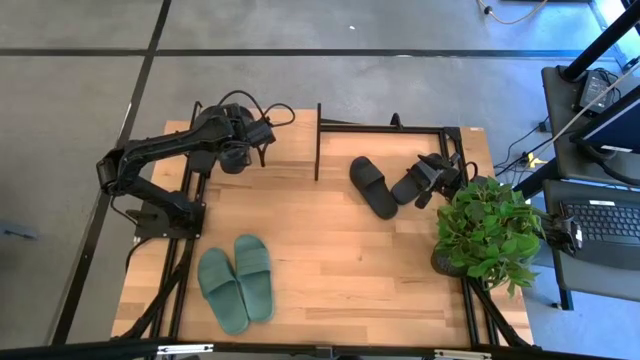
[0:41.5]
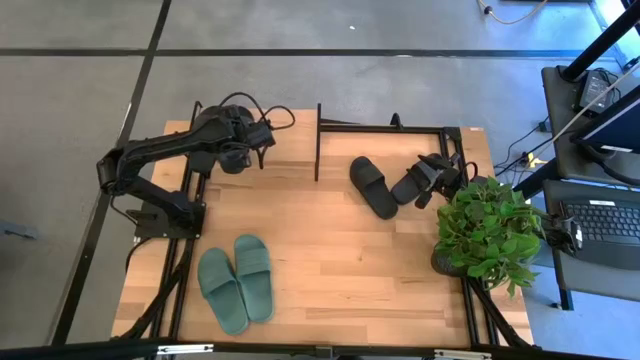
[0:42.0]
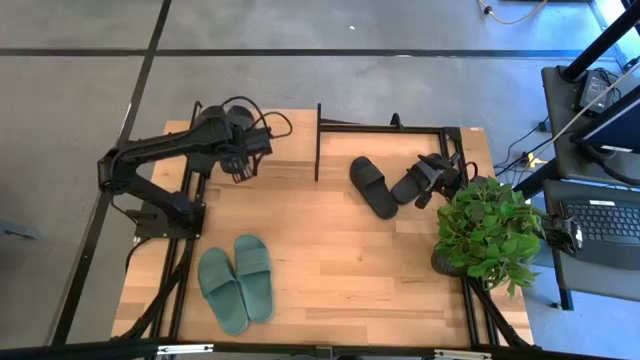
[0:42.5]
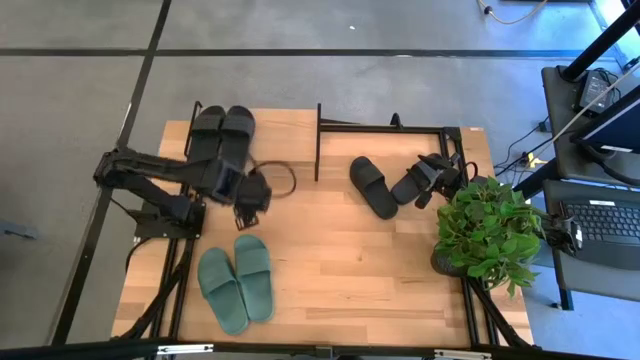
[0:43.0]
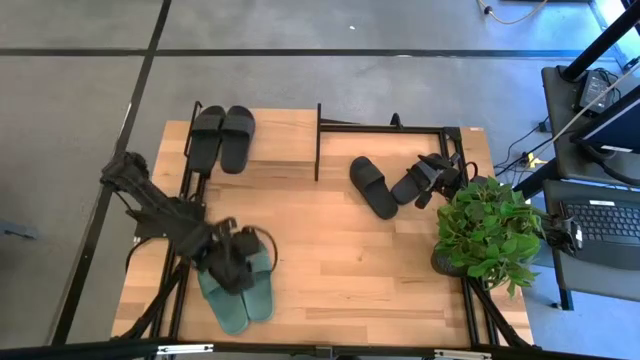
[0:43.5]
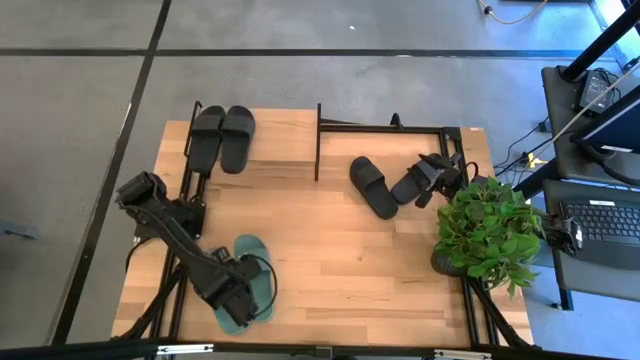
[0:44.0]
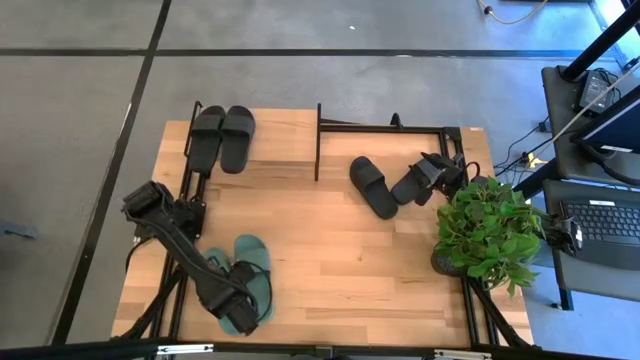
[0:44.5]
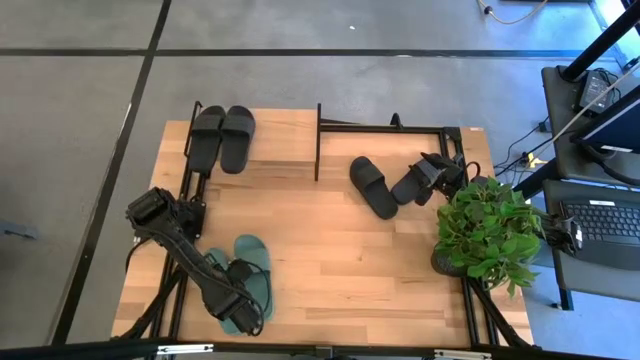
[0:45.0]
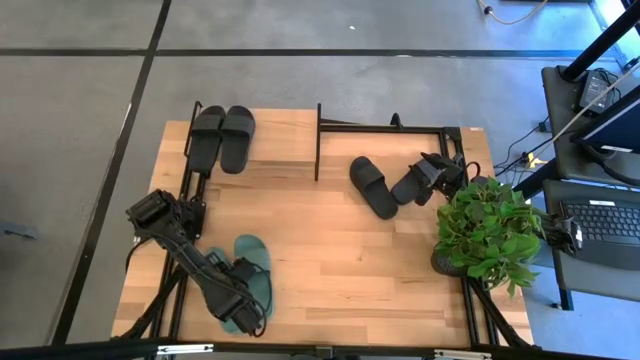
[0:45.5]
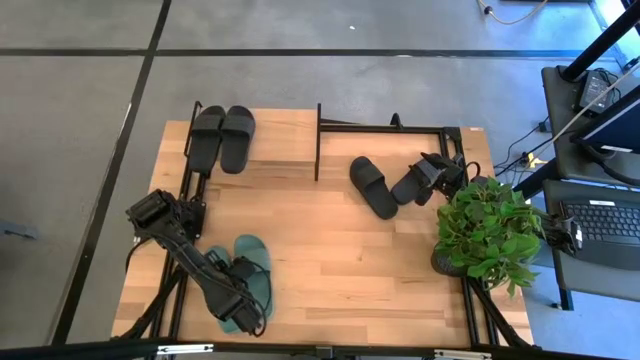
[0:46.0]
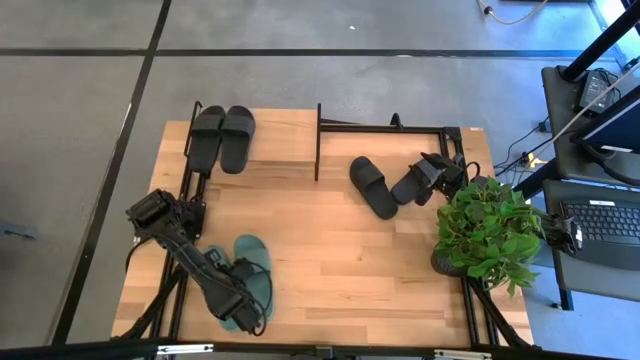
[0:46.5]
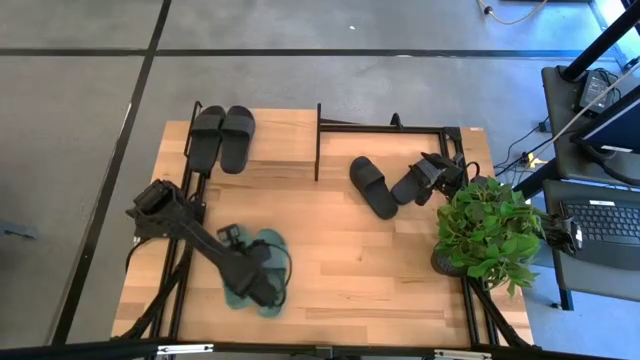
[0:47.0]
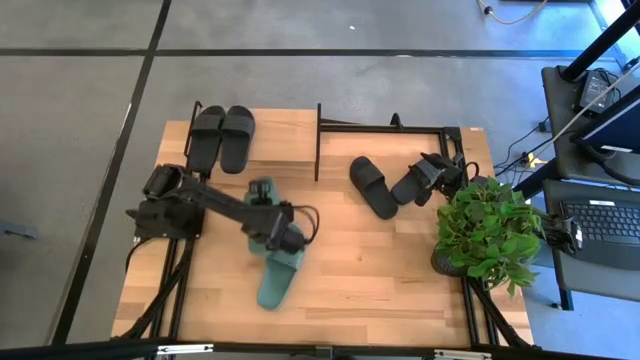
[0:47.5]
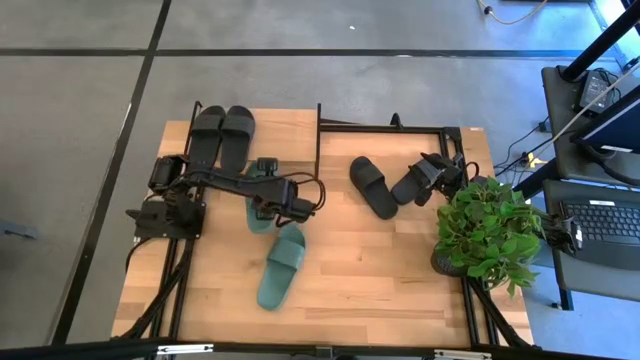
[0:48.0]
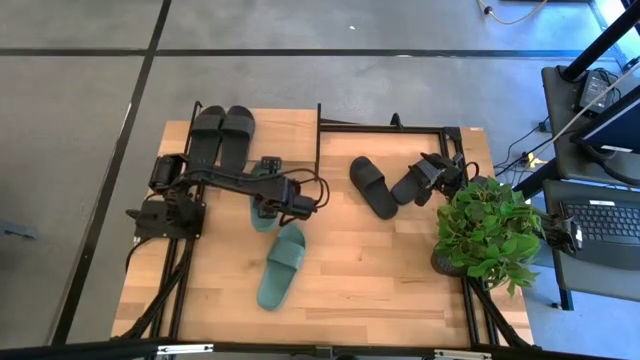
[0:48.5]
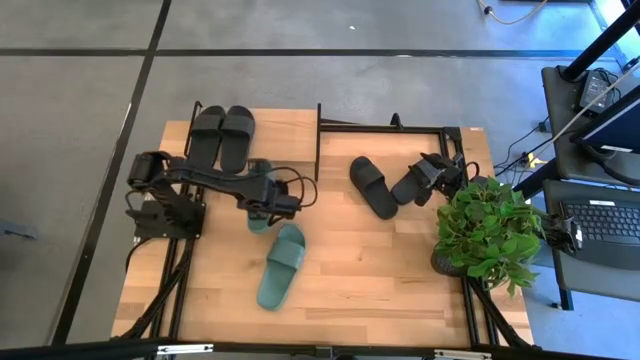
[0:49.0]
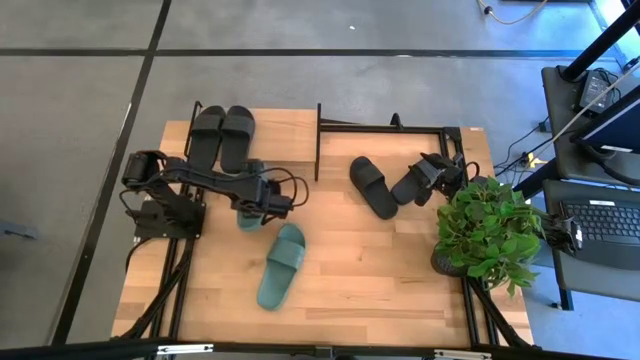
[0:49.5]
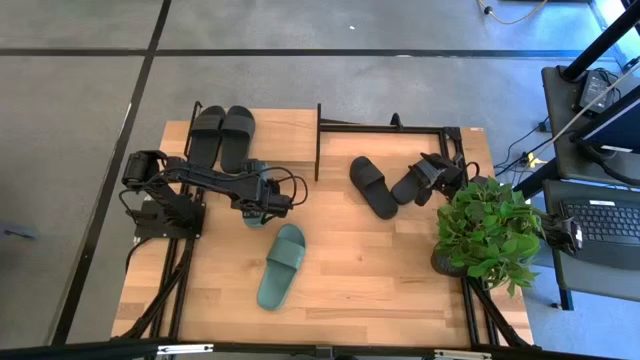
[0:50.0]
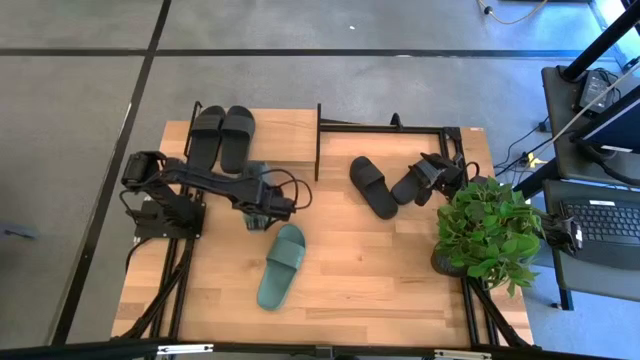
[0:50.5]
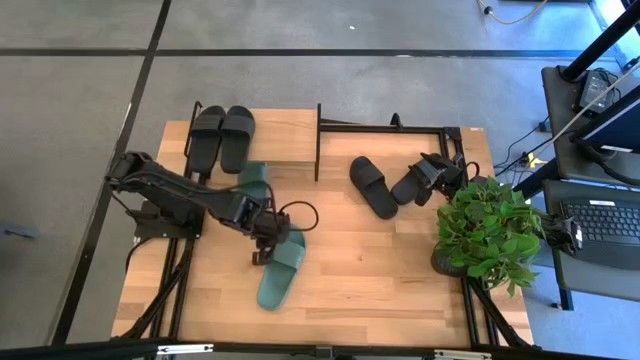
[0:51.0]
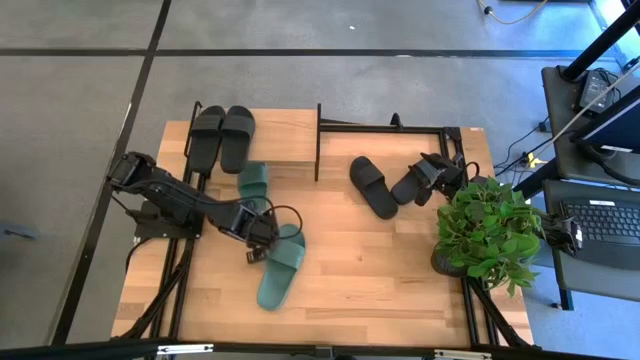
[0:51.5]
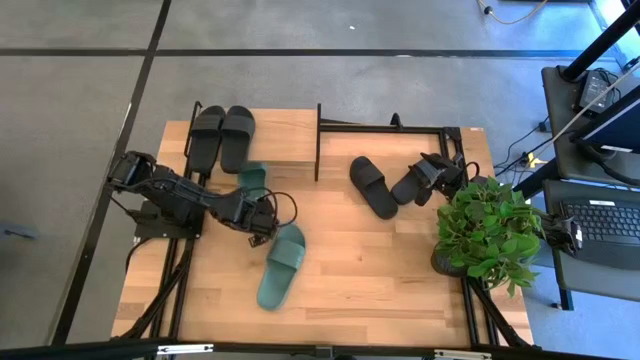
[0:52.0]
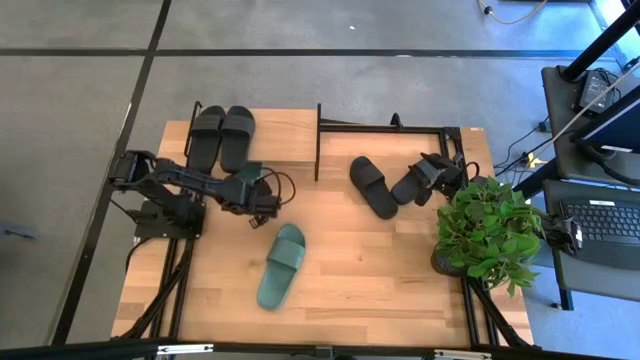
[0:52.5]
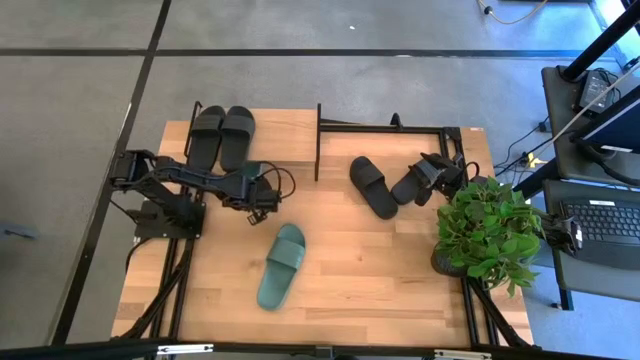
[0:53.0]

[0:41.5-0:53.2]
Task: Pick and place slides into the shelf
Put the green slipper under the shelf

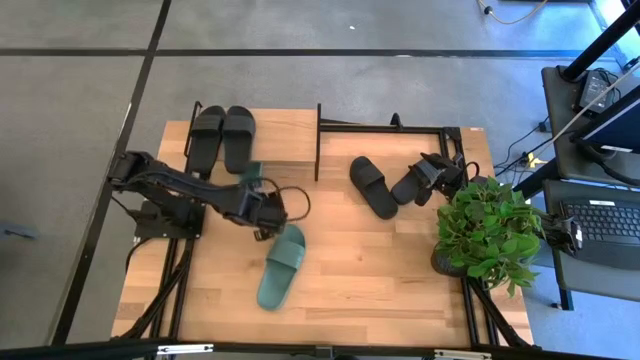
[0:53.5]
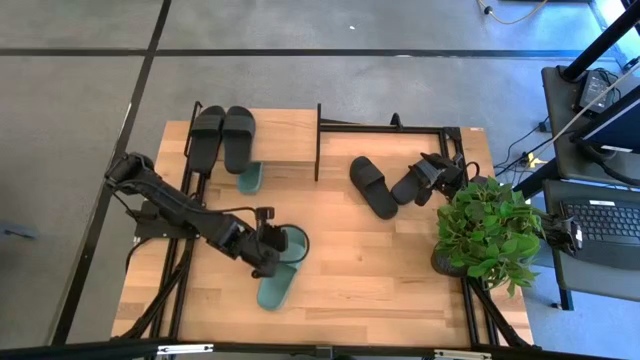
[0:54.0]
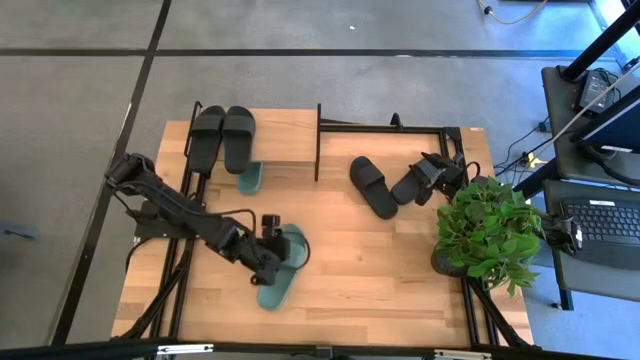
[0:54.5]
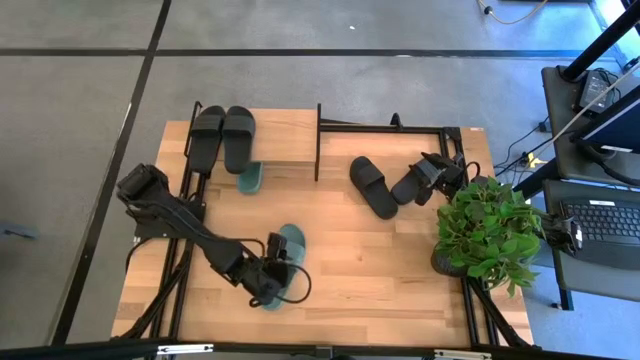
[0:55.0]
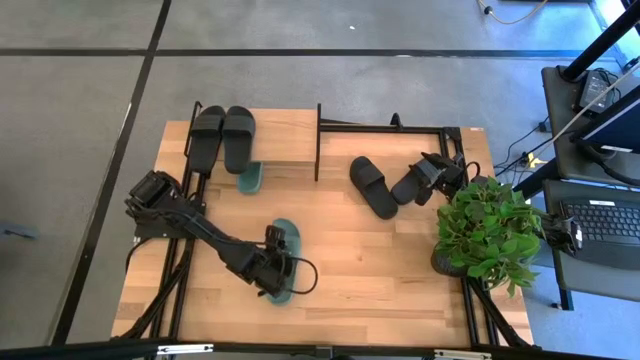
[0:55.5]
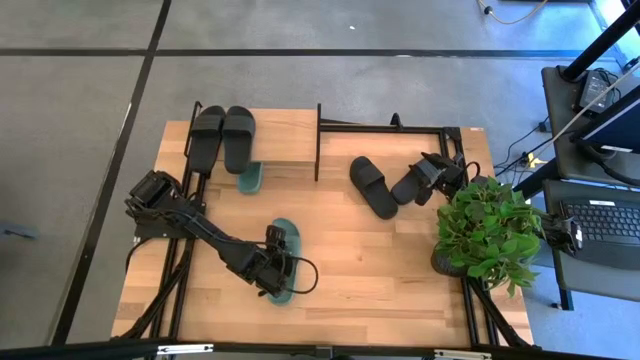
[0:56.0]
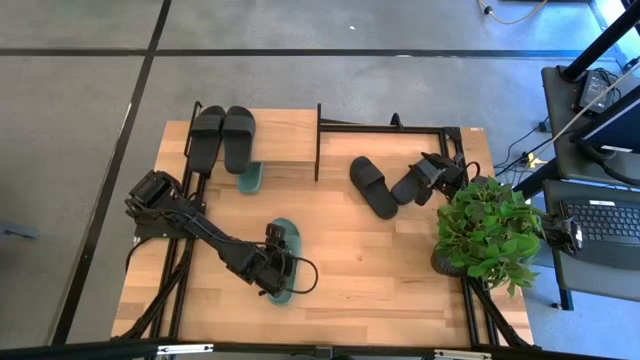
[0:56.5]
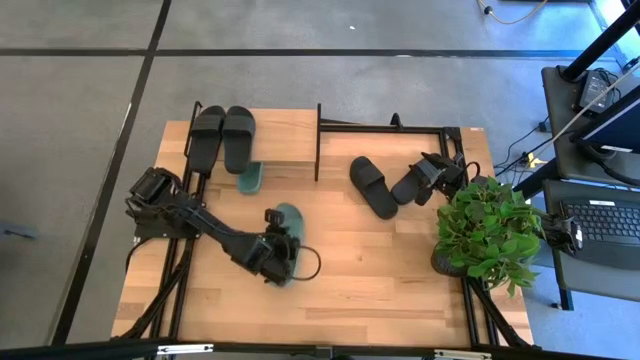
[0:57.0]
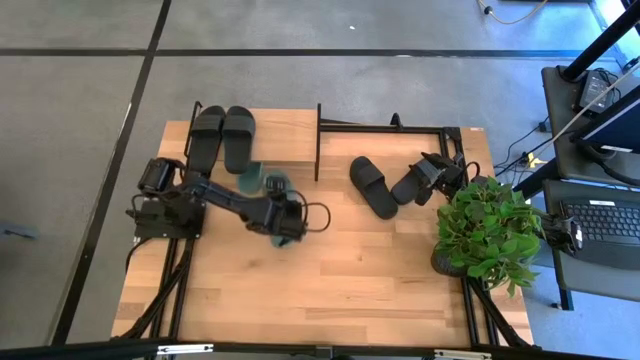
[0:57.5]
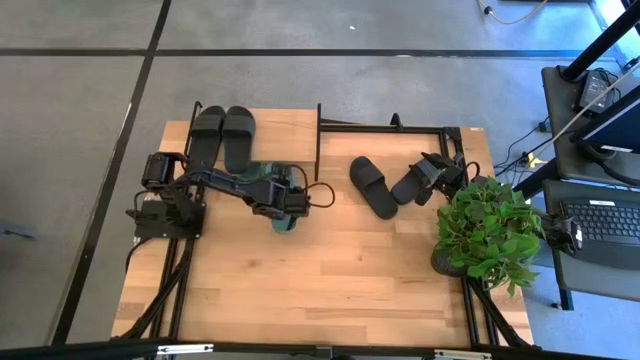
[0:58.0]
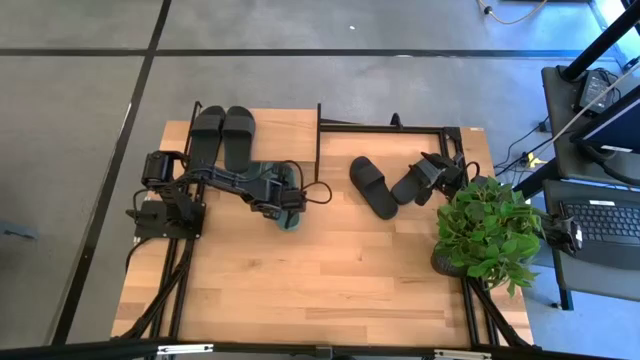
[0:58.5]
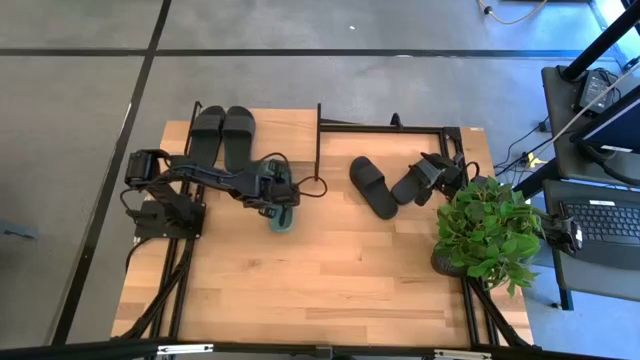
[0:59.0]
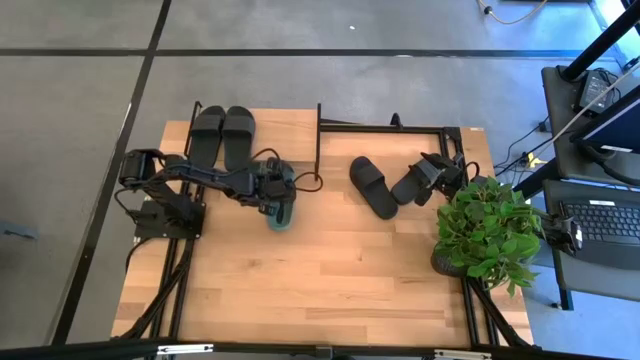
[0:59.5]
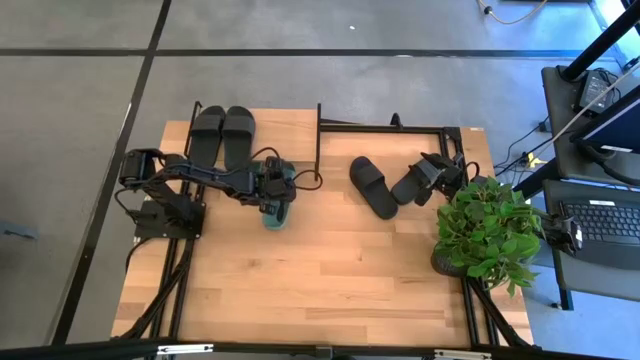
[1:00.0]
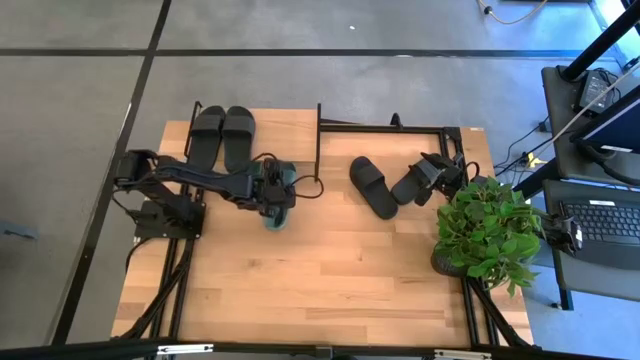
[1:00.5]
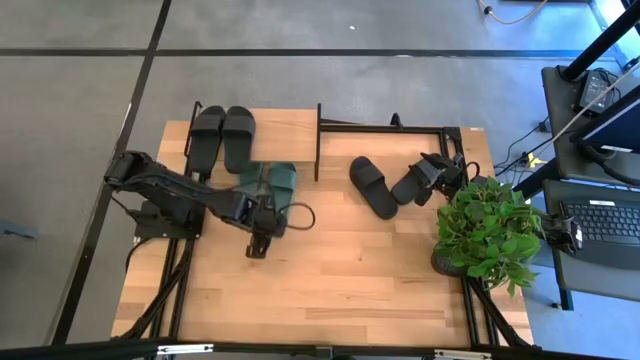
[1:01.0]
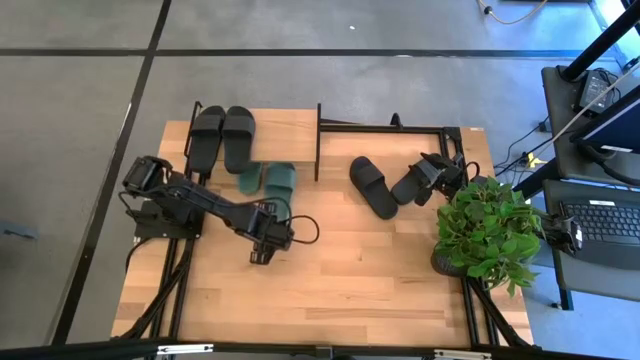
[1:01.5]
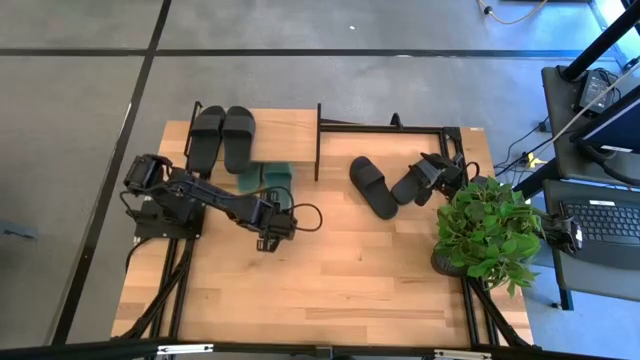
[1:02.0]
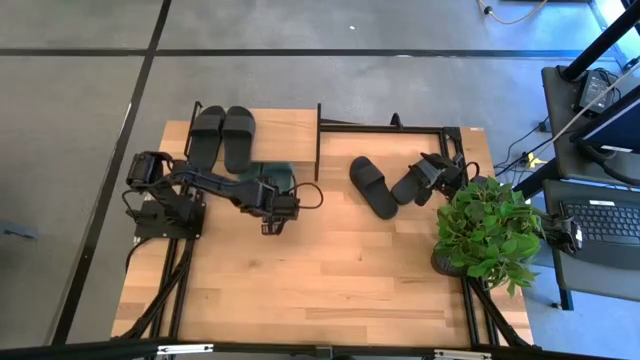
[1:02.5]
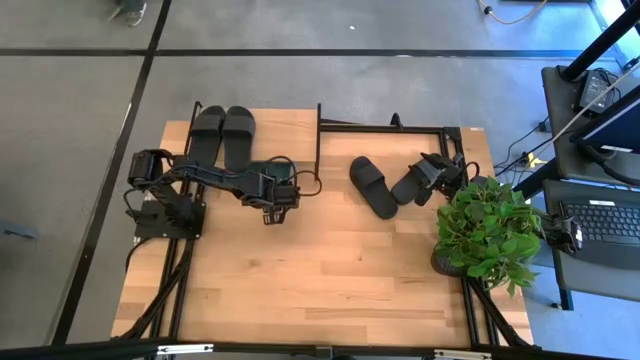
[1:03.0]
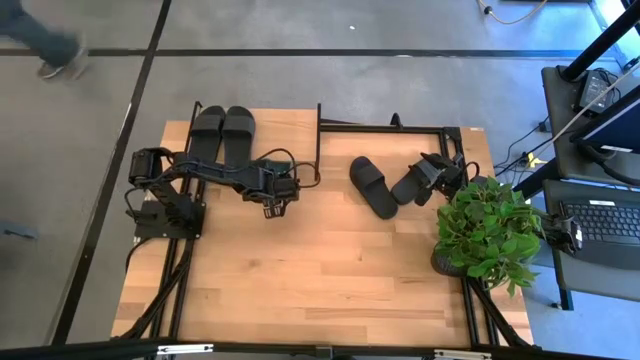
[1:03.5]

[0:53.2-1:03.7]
Put the green slipper under the shelf
